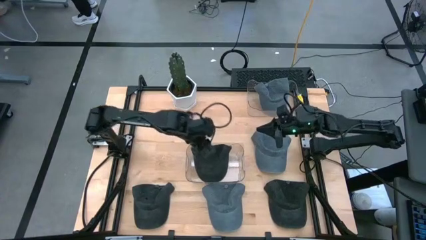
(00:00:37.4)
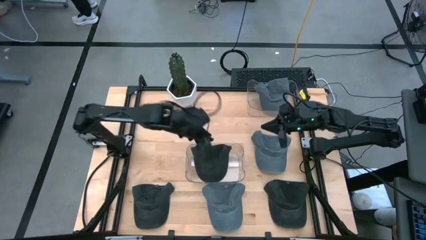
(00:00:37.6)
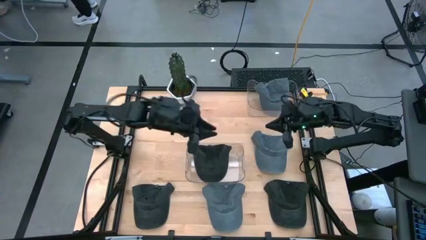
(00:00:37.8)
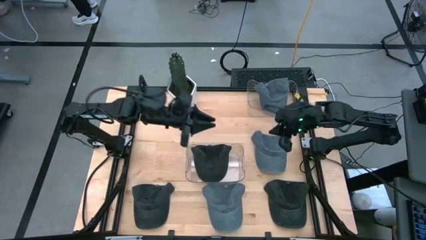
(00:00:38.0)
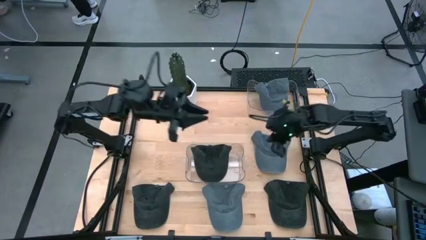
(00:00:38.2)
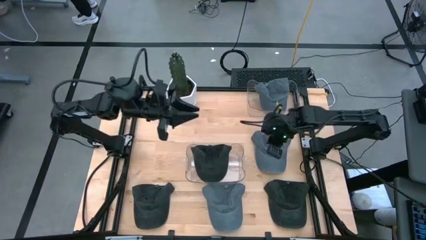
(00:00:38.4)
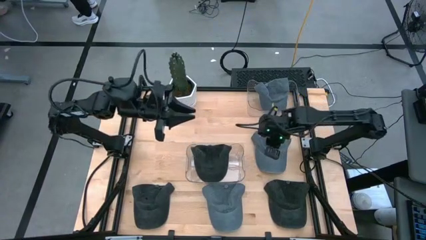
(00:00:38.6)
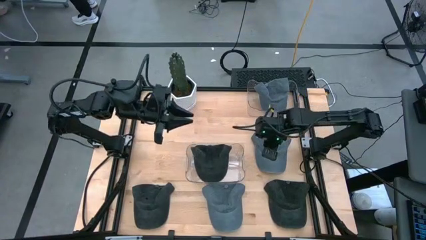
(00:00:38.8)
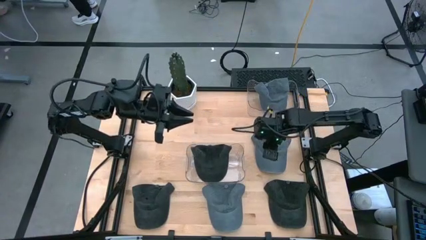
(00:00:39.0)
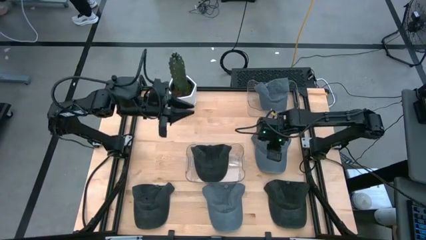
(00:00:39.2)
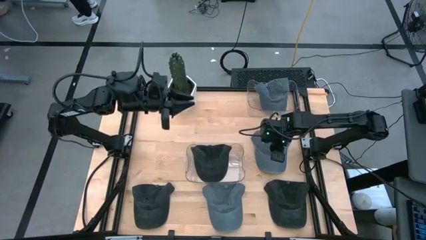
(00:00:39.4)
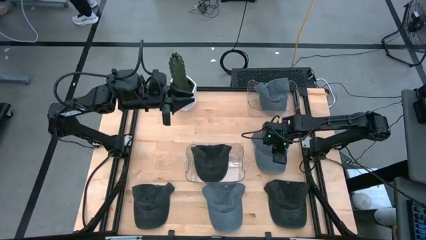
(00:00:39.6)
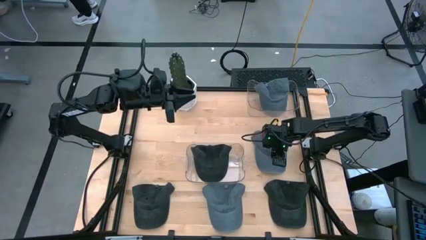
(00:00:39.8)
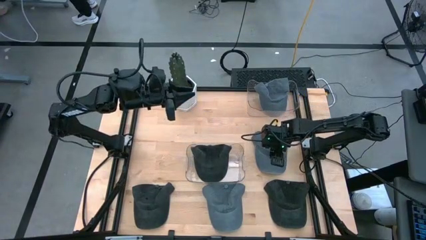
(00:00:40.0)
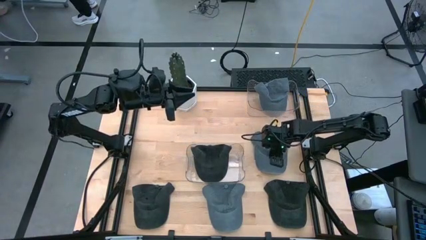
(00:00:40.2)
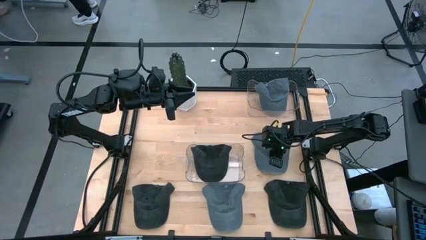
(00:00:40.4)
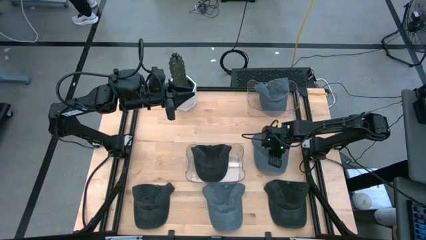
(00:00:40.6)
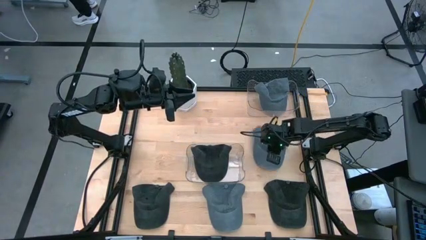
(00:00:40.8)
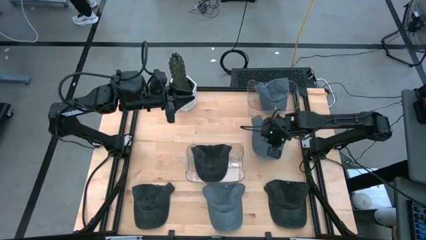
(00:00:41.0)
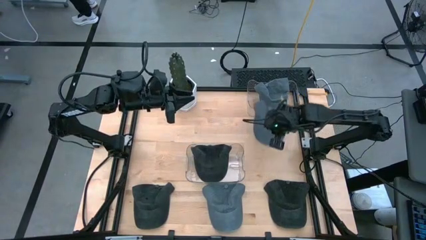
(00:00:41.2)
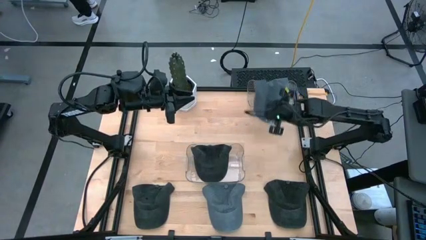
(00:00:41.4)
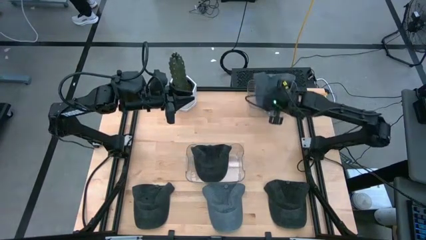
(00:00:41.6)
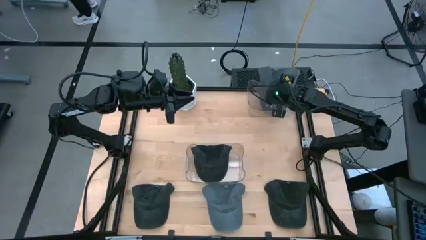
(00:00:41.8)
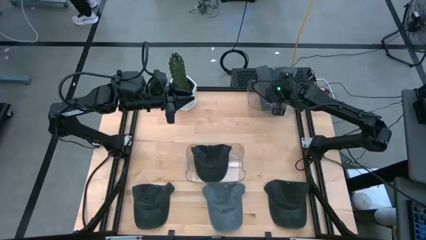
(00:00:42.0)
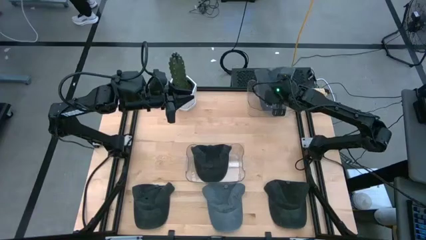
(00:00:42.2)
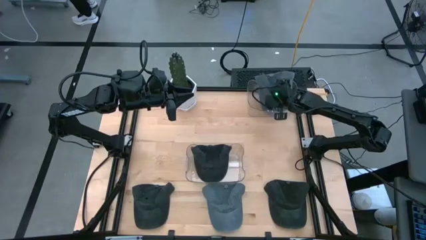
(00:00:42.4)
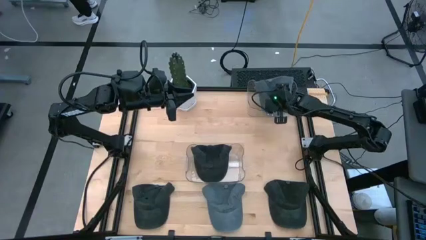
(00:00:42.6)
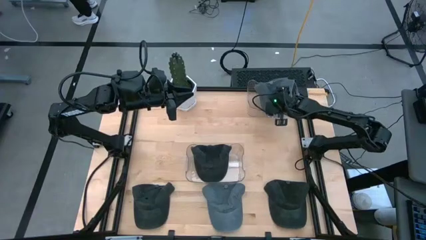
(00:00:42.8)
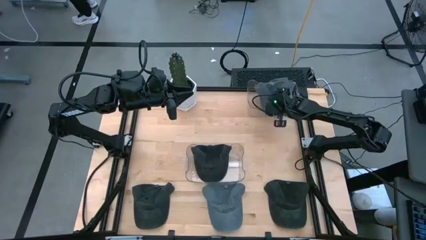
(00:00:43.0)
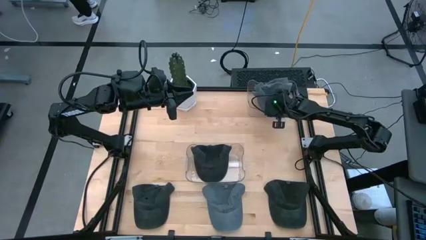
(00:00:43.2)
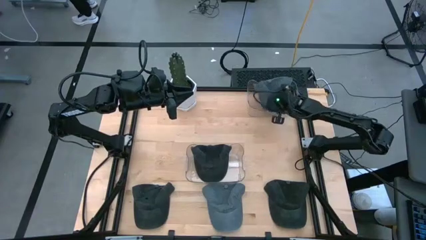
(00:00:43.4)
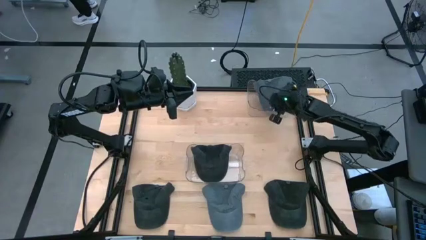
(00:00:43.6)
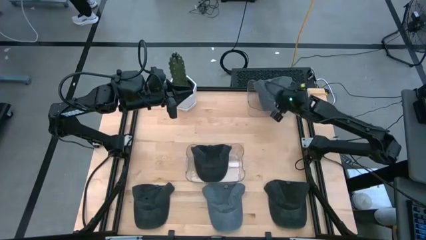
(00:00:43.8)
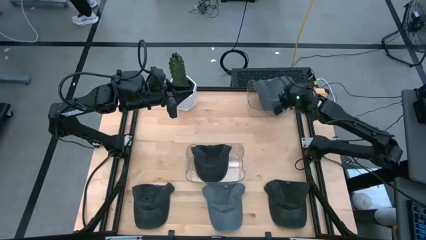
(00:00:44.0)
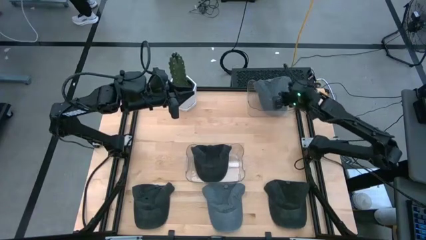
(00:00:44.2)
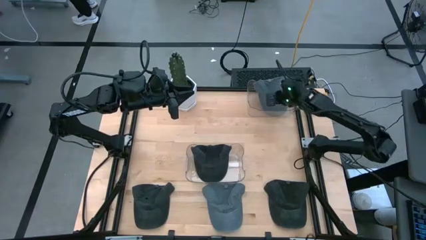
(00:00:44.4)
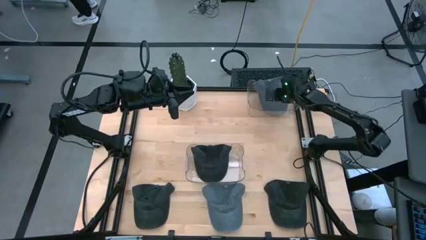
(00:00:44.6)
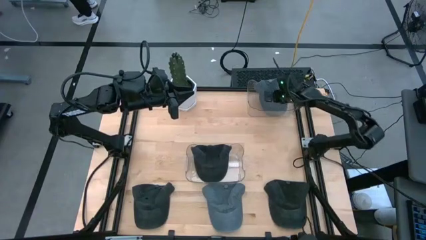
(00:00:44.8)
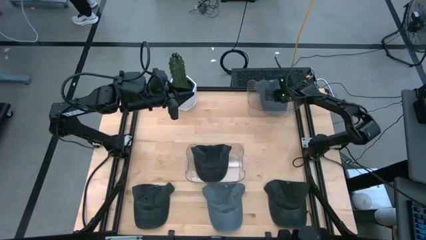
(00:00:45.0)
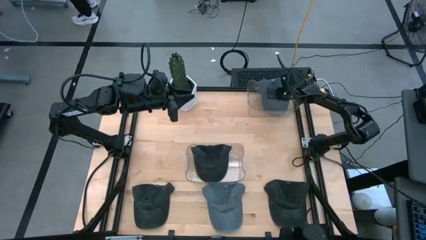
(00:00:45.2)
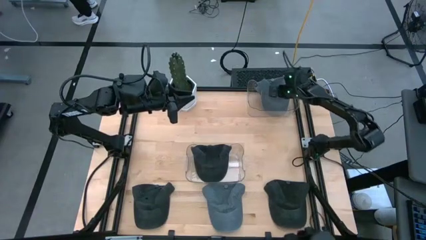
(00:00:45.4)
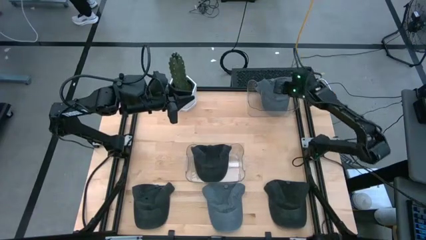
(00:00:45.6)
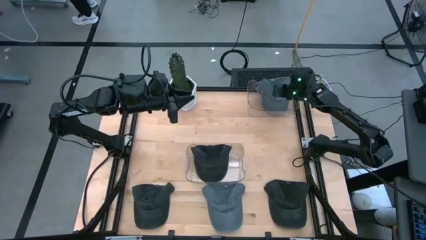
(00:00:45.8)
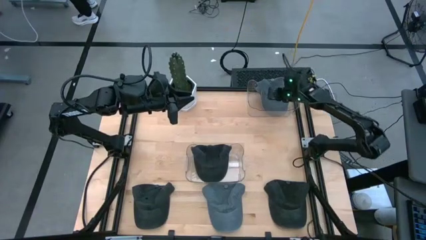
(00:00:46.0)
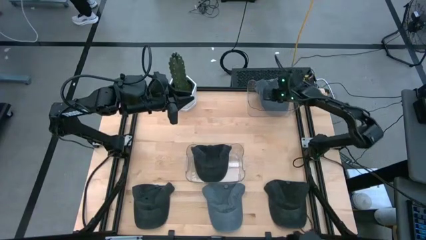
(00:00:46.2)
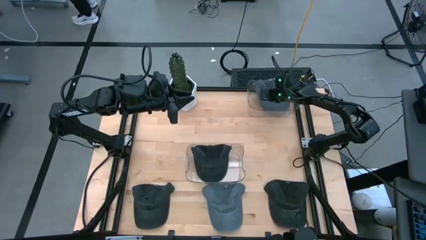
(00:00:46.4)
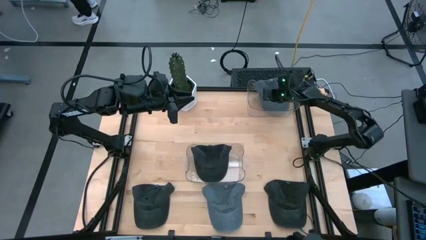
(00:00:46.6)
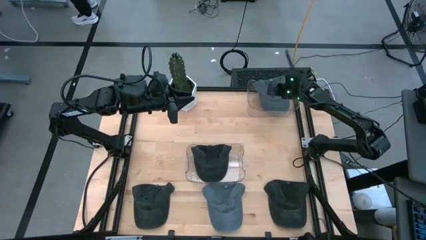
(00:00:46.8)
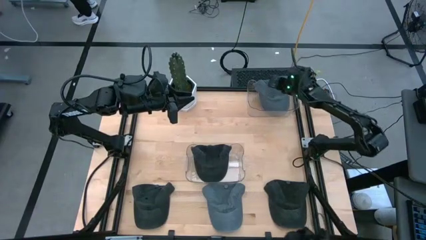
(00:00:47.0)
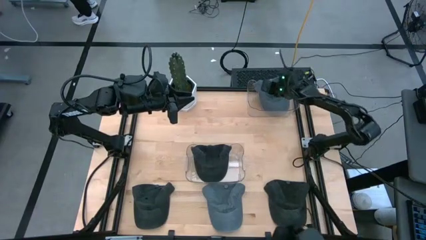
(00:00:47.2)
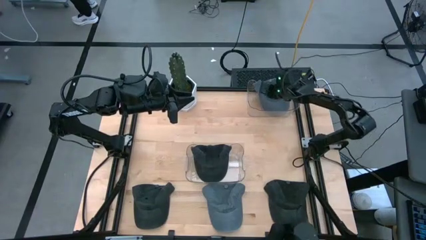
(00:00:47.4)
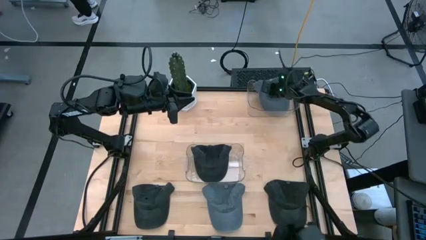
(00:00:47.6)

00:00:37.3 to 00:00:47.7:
Task: Pick & Place hat
Put the right gray cap into the top transparent bin

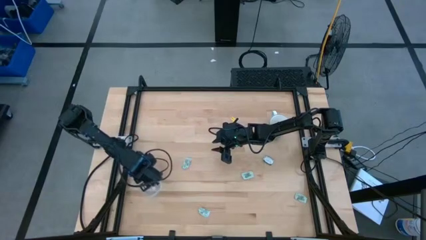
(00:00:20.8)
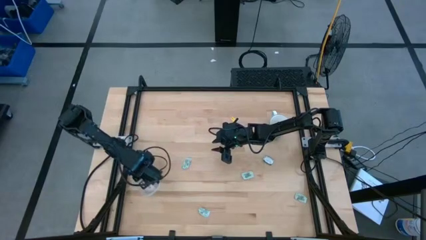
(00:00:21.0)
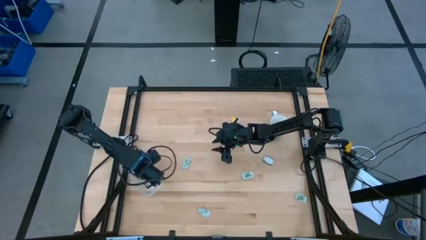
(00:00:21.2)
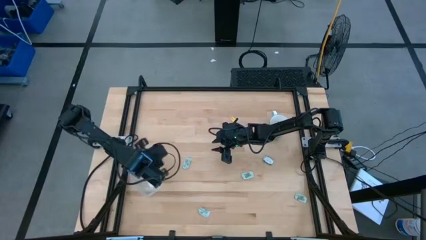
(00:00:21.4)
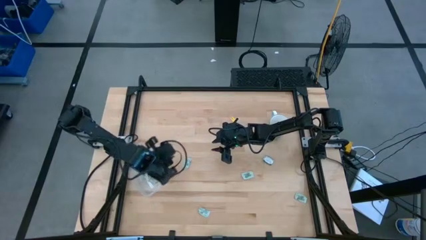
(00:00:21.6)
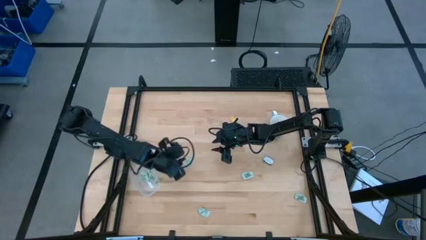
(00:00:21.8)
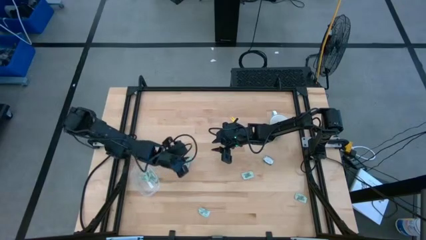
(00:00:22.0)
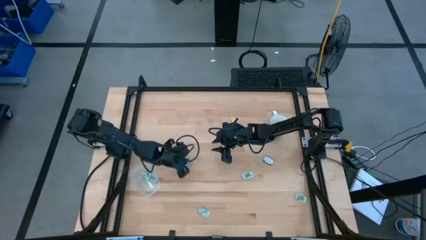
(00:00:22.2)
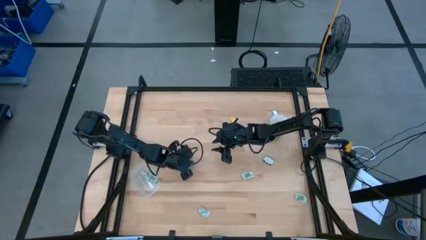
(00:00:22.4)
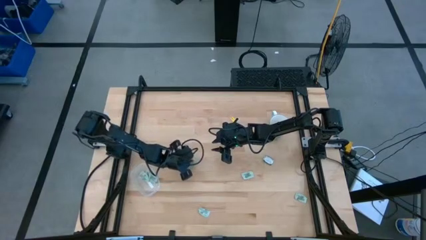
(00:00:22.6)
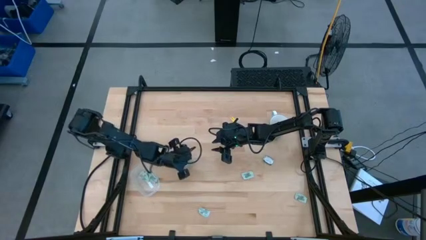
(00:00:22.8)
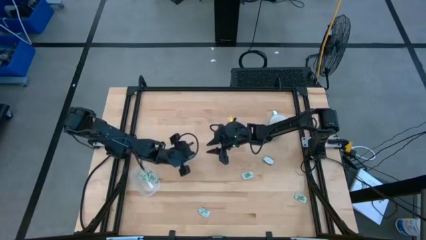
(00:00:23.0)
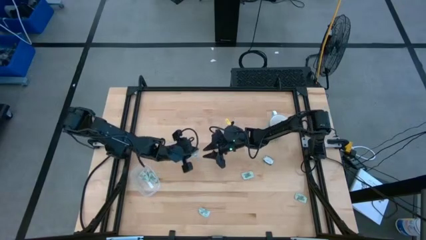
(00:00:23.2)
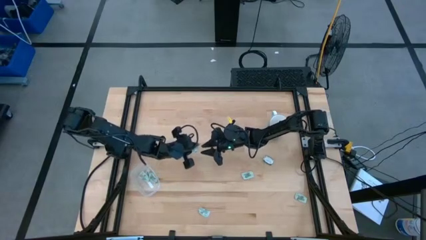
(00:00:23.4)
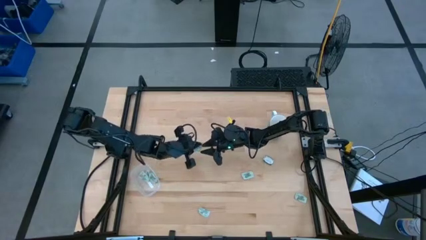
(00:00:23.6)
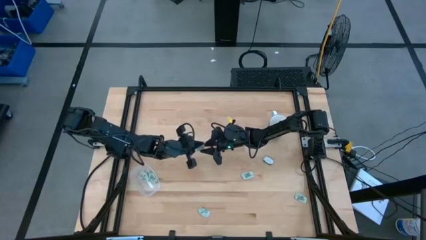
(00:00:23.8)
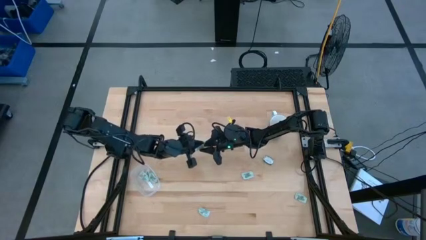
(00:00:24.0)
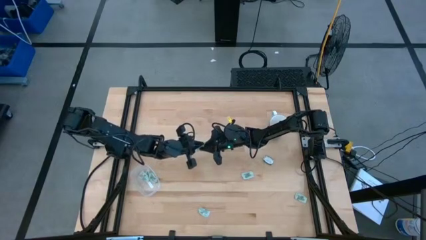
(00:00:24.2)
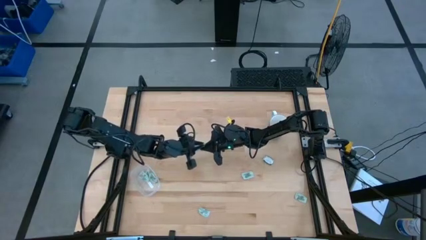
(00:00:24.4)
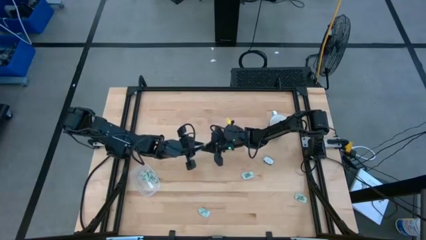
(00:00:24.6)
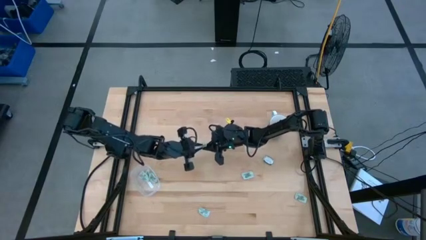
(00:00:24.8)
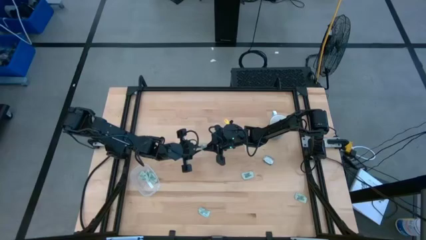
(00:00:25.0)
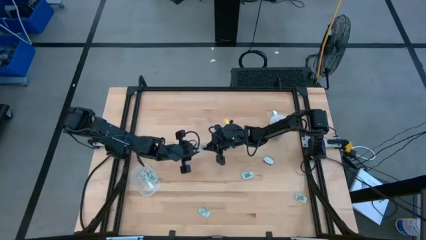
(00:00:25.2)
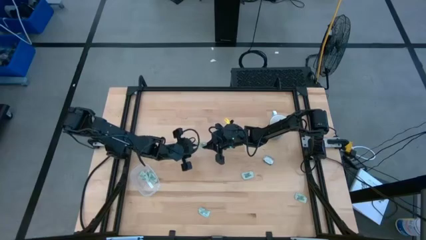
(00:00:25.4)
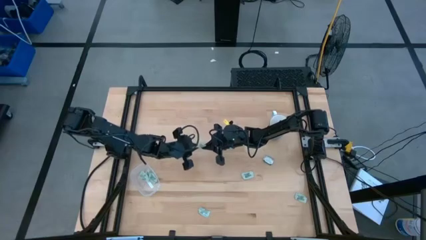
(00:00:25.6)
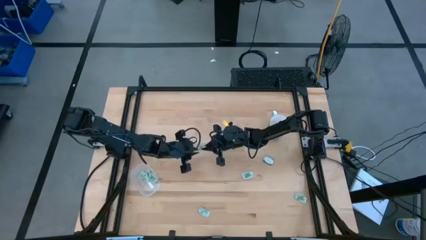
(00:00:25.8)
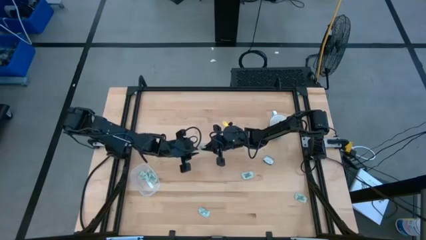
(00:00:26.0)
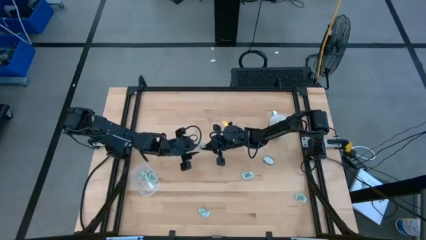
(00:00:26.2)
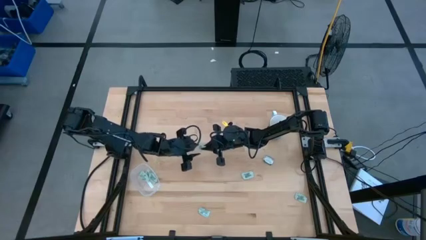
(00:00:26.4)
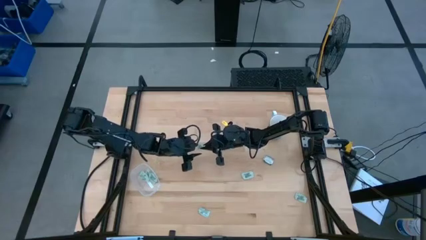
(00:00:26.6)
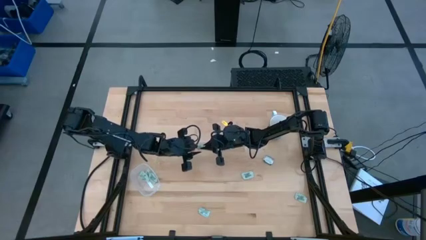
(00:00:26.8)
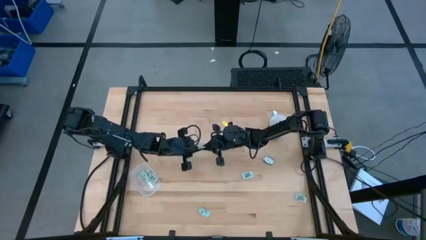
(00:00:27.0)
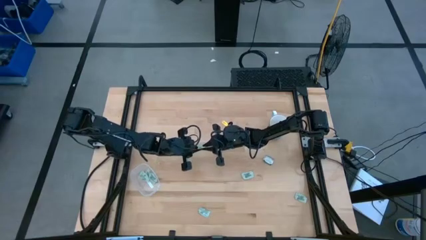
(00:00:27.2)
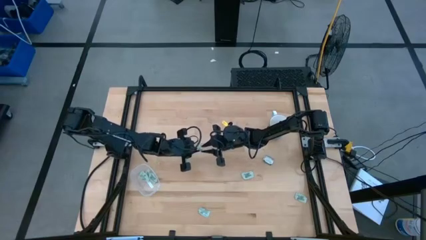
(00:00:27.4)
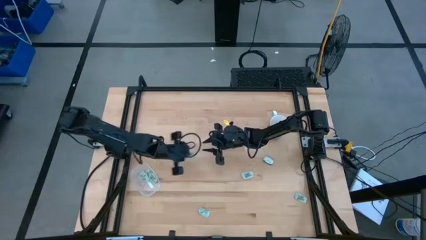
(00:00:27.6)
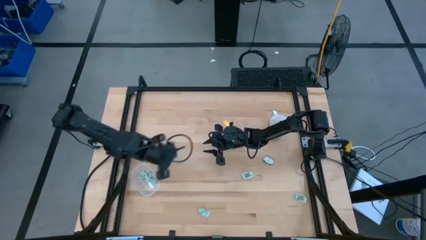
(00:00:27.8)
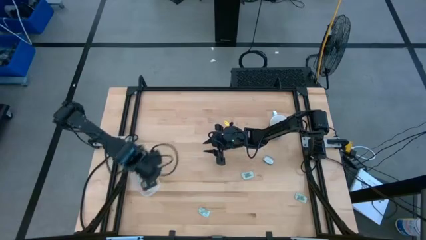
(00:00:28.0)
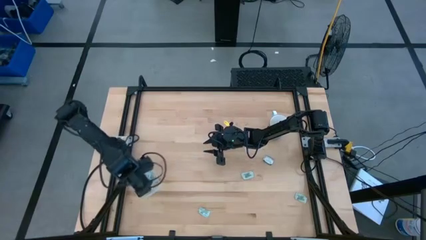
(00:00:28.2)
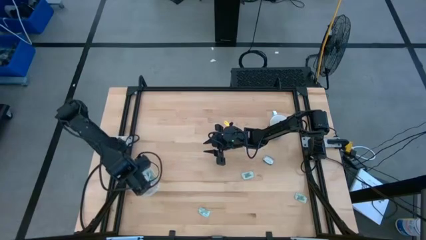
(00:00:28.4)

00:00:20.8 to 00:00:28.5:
Task: Pick and place Stevia / Truvia into bins
Put the stevia packet into the transparent container
